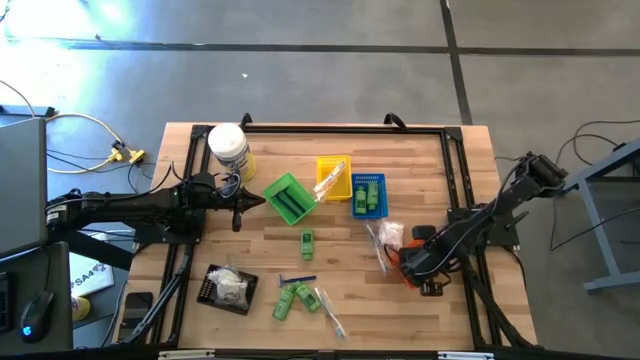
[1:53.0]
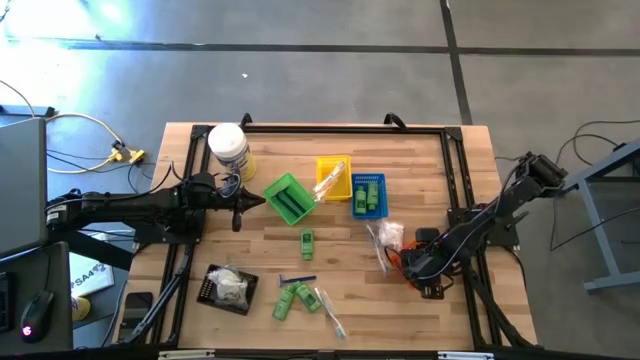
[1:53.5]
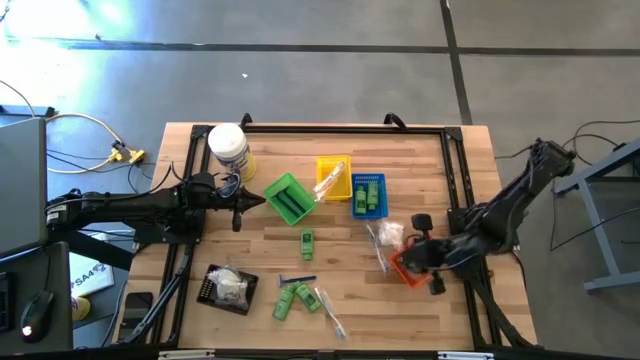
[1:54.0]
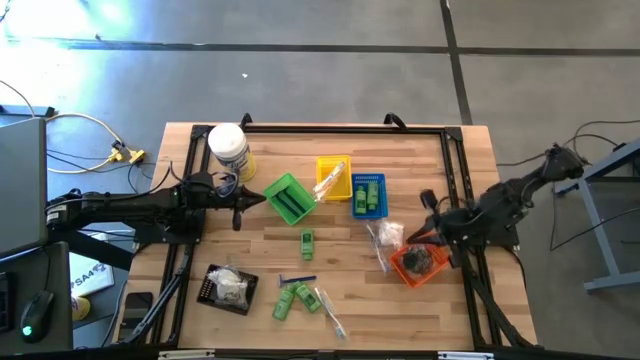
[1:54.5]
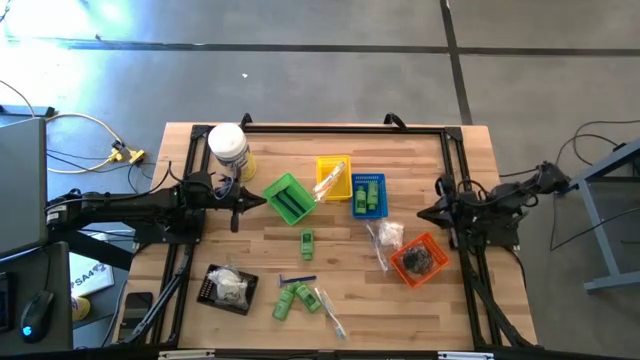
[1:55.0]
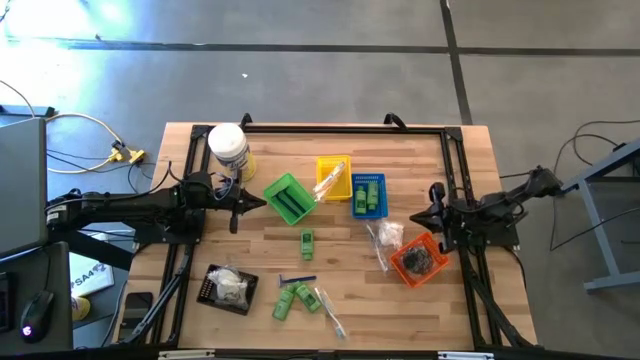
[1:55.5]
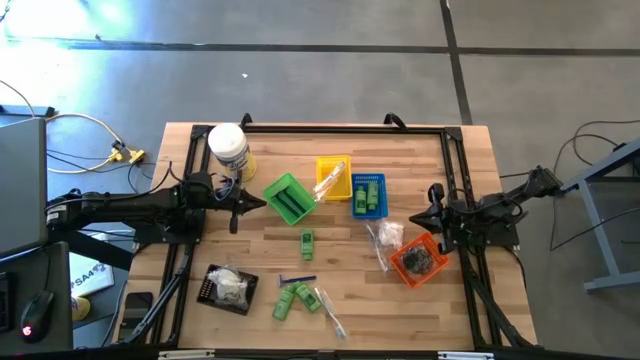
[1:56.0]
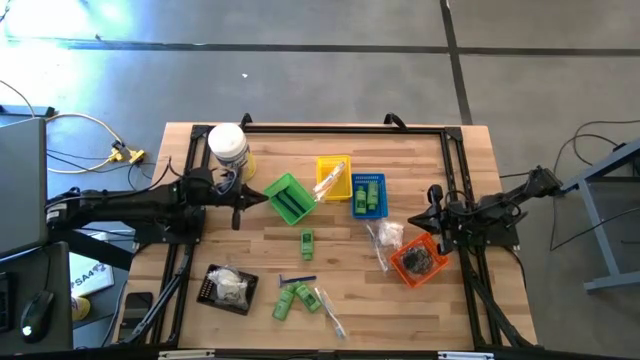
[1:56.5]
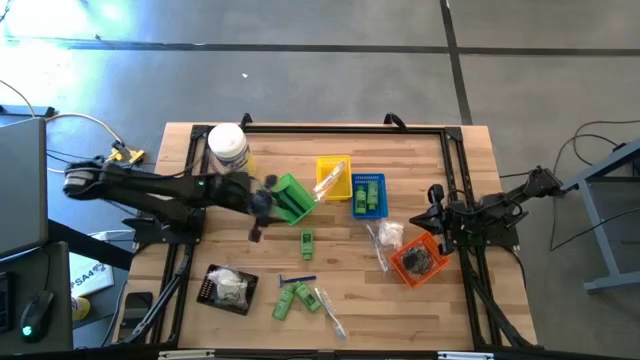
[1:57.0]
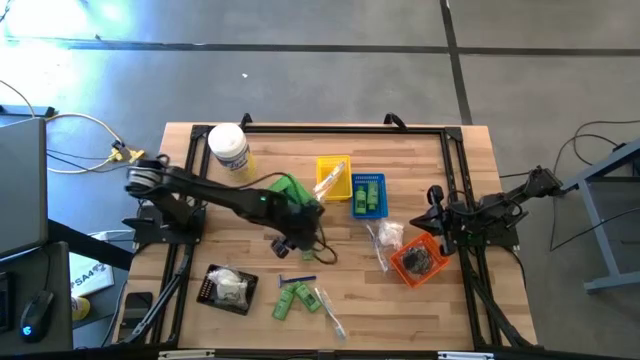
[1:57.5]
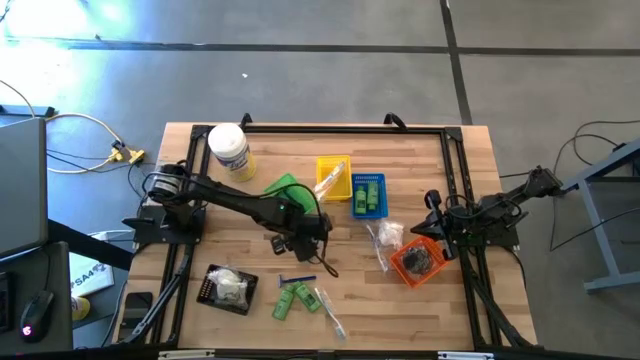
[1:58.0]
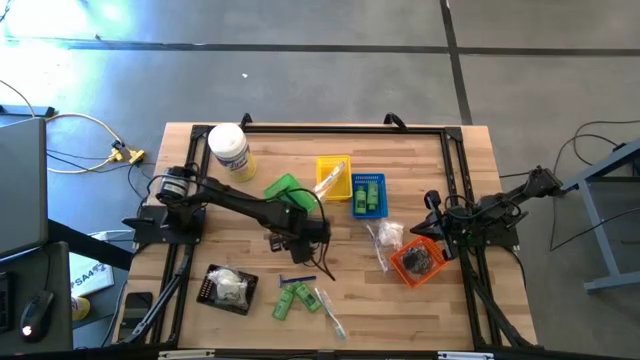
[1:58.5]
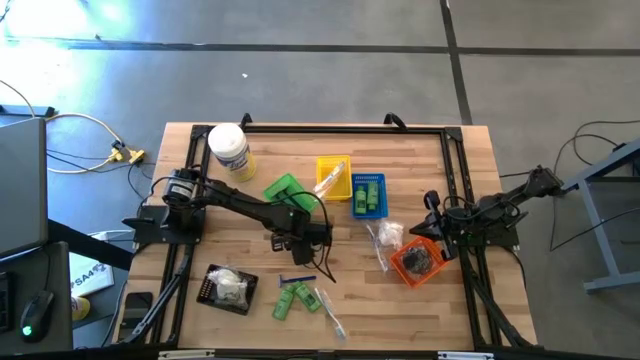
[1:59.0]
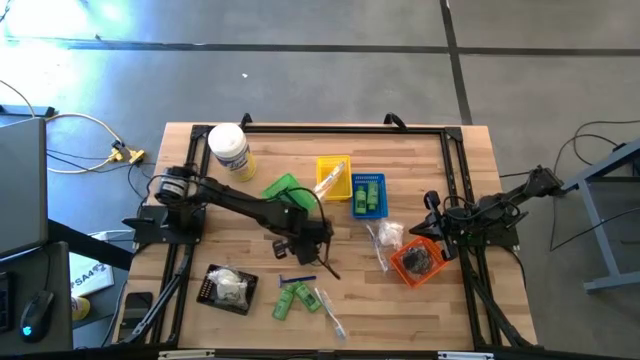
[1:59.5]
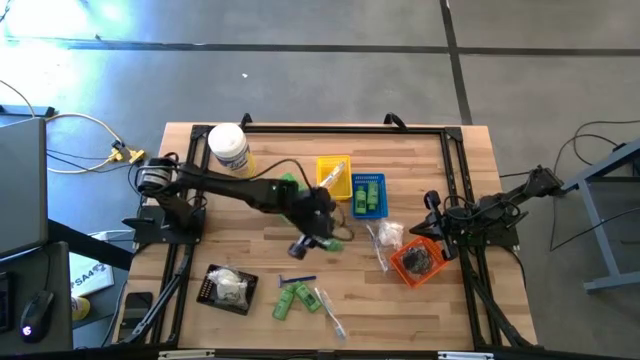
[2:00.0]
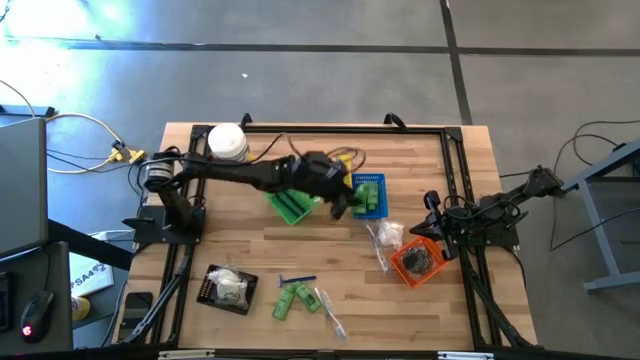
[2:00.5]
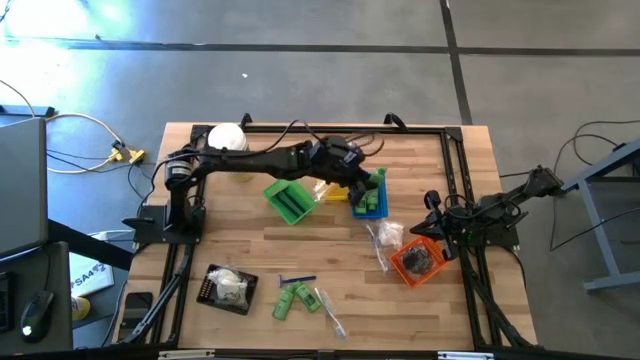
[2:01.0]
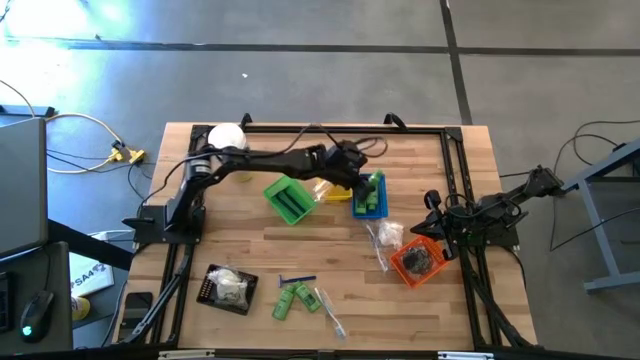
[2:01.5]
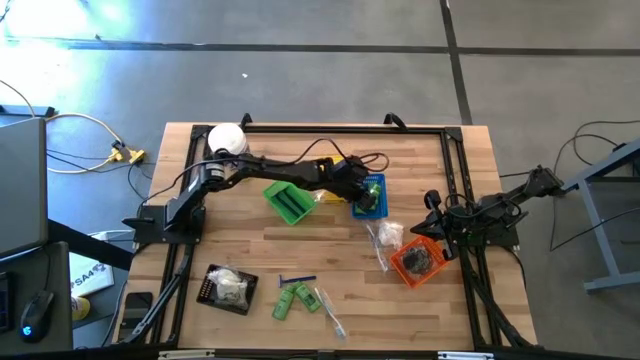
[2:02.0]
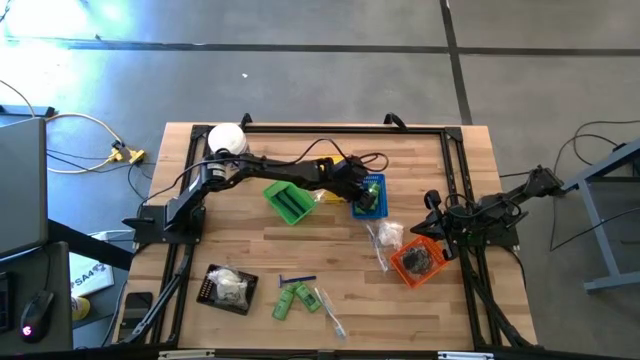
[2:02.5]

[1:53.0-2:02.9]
Task: Pick & Place Travel size toiletries
Put the green shampoo into the blue basket

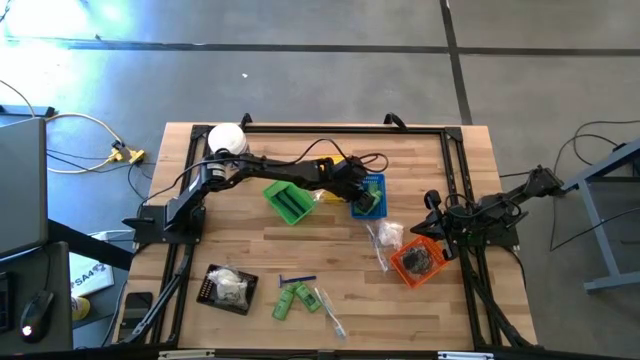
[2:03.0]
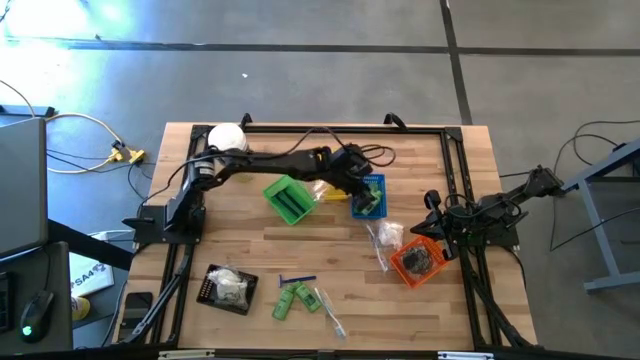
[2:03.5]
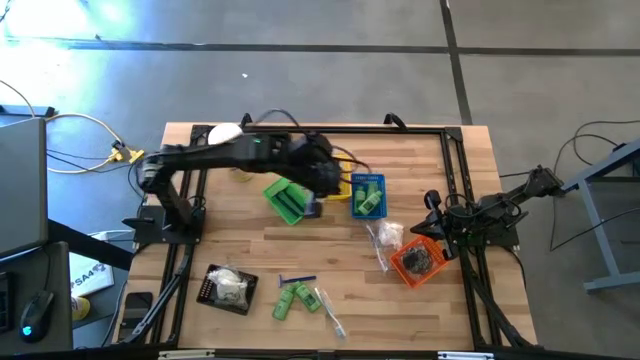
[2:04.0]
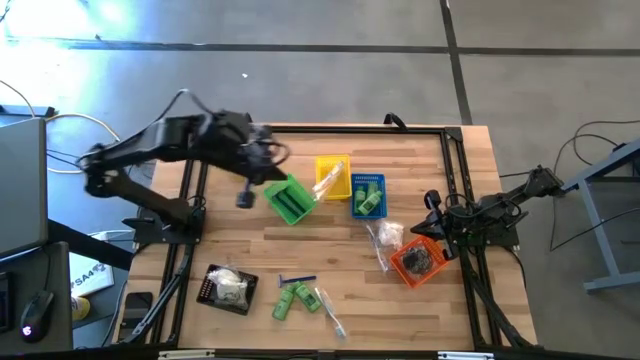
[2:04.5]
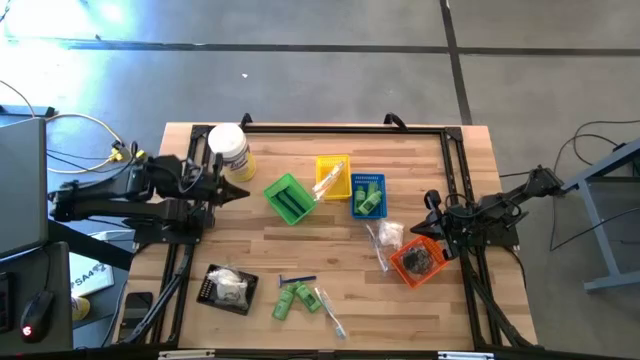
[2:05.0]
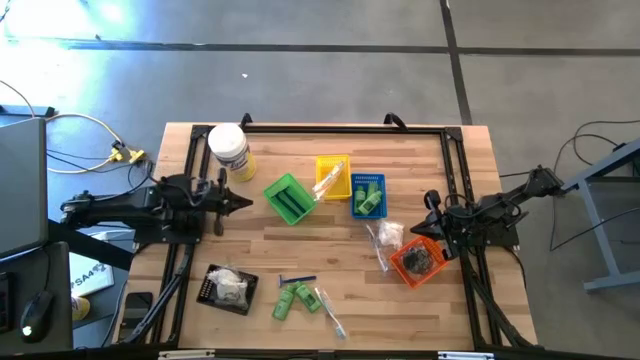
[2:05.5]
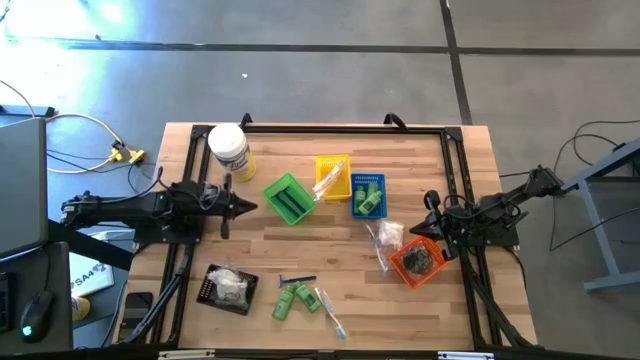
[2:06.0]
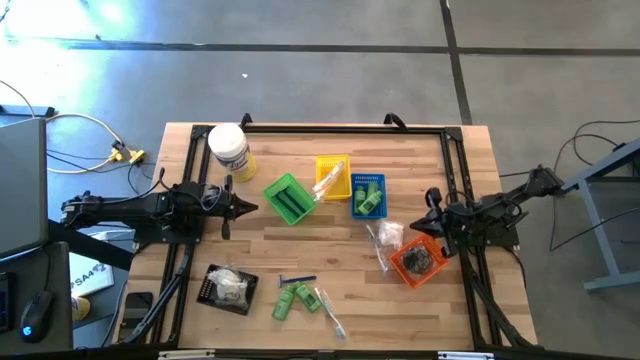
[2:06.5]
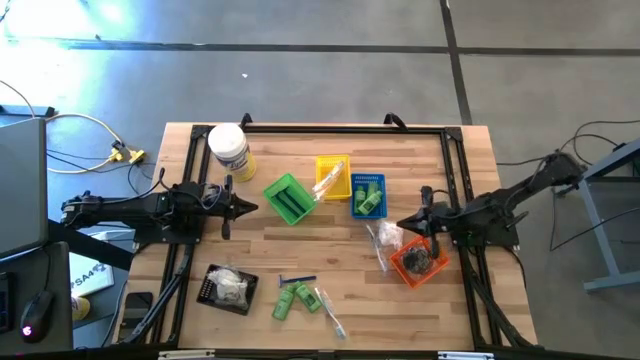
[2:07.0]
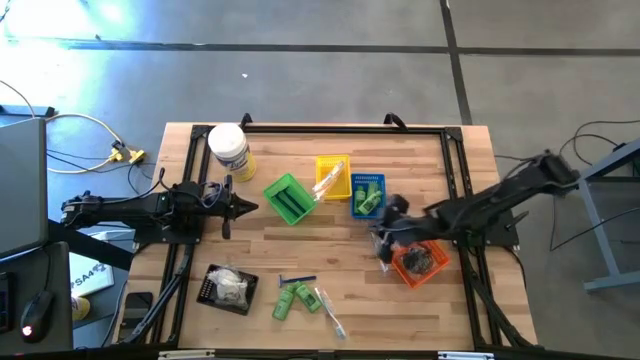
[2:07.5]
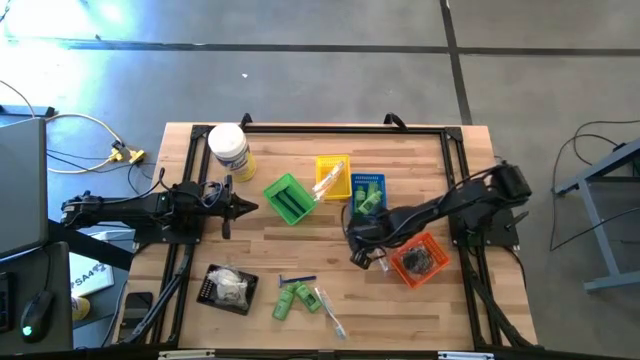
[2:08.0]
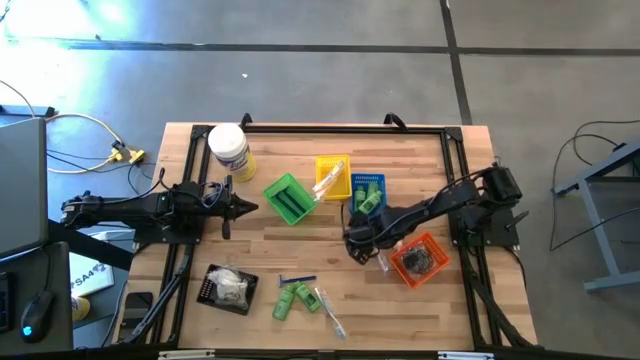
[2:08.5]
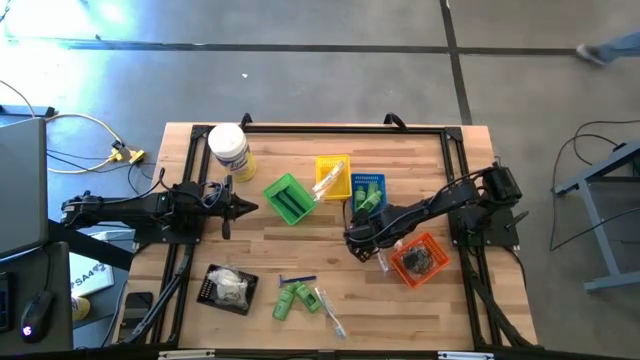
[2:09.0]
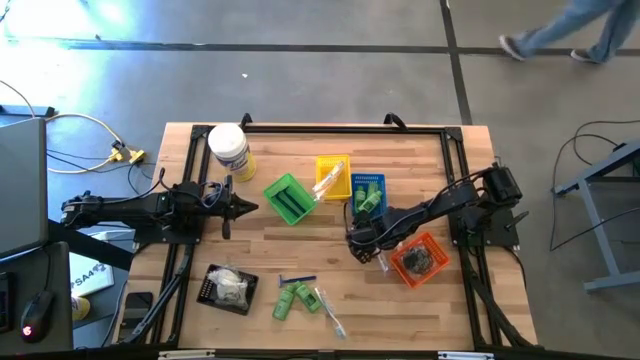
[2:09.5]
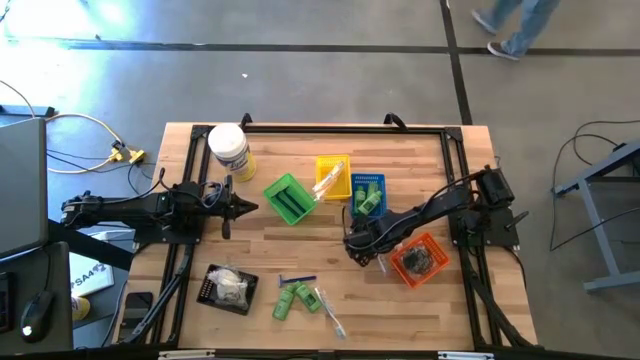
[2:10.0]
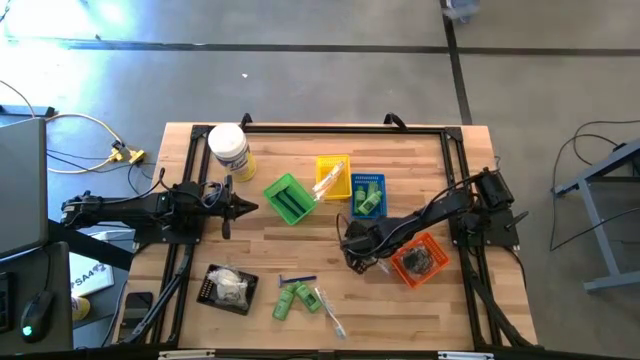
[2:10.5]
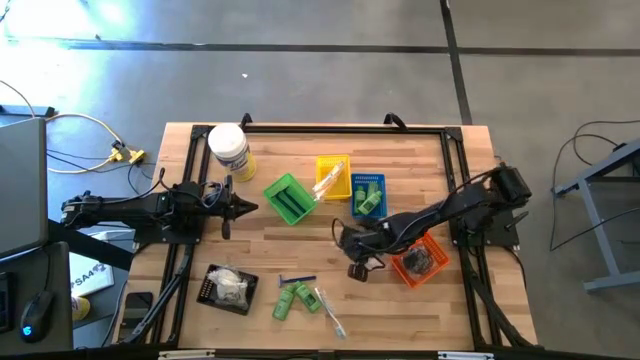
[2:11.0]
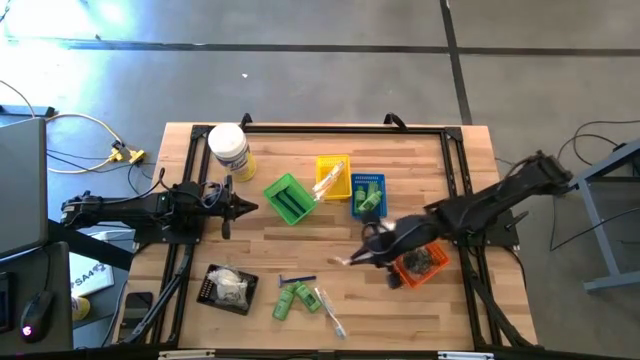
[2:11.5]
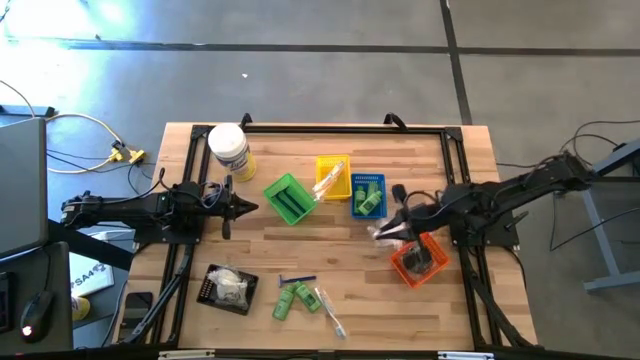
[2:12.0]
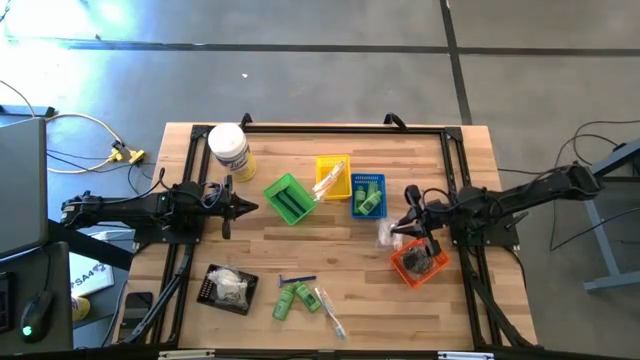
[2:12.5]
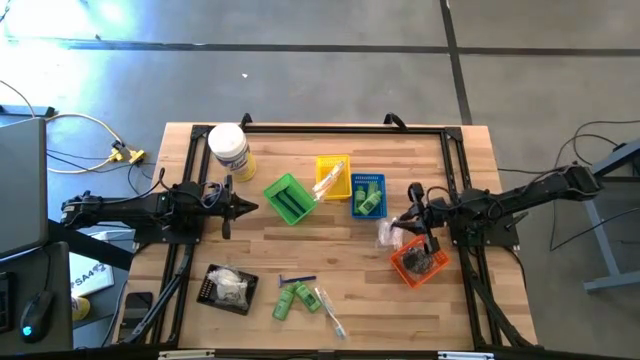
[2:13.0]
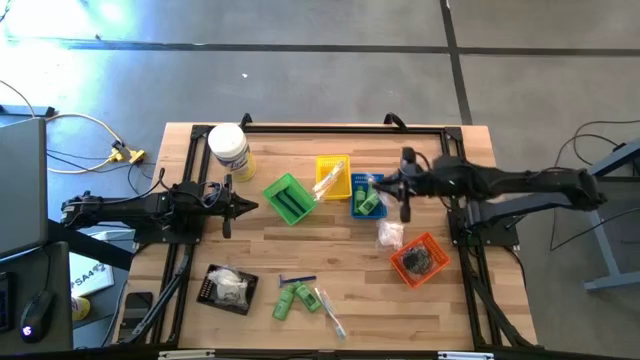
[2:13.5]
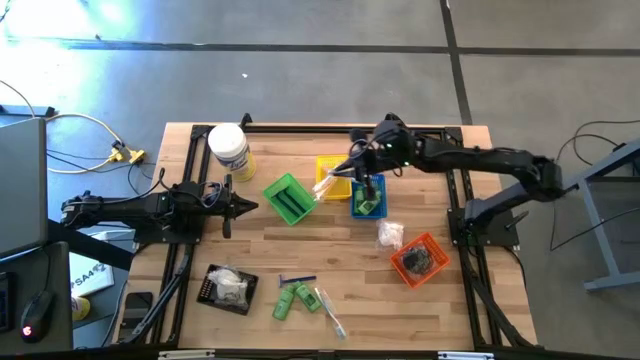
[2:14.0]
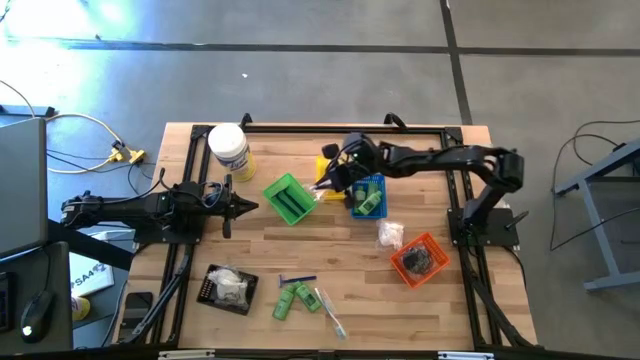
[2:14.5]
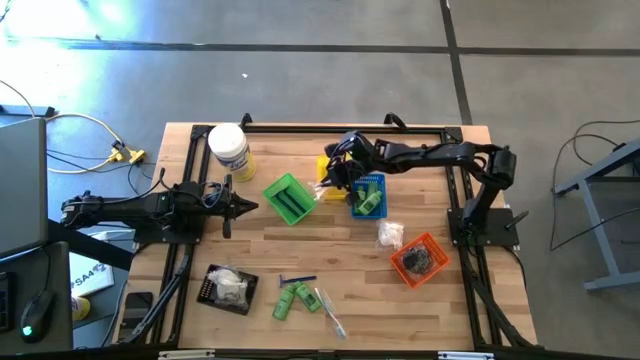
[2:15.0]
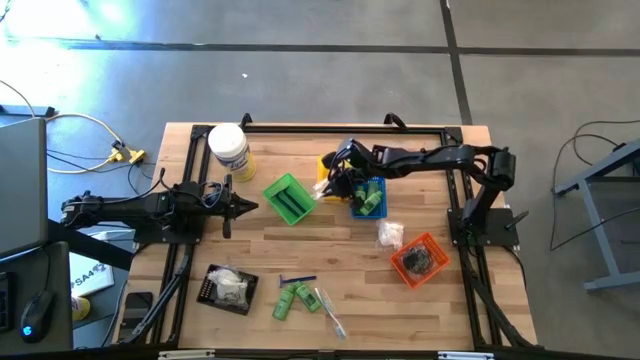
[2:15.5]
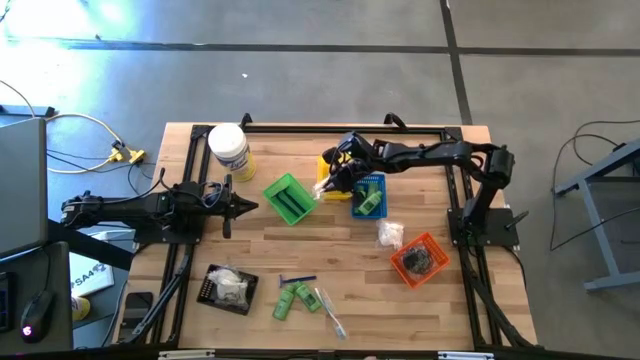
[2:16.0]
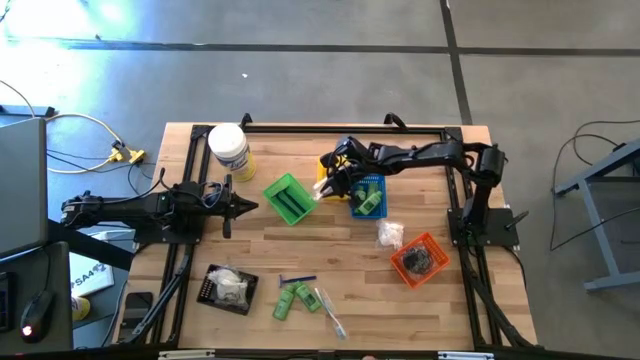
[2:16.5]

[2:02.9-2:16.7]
Put the blue toothbrush into the yellow basket
